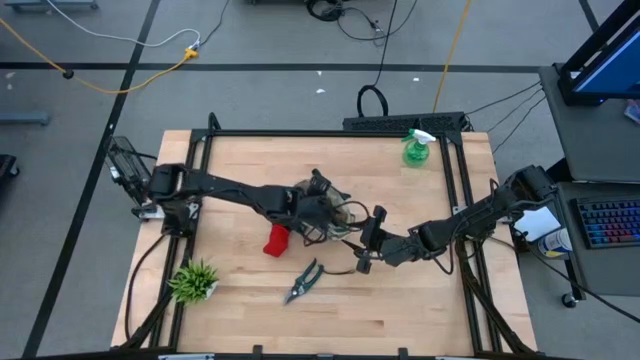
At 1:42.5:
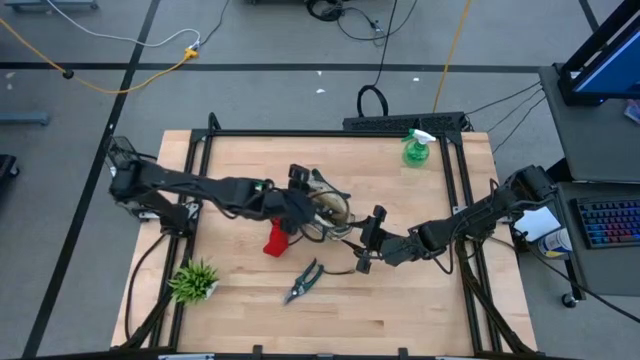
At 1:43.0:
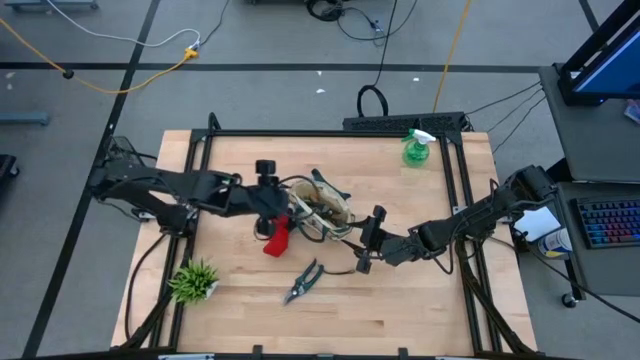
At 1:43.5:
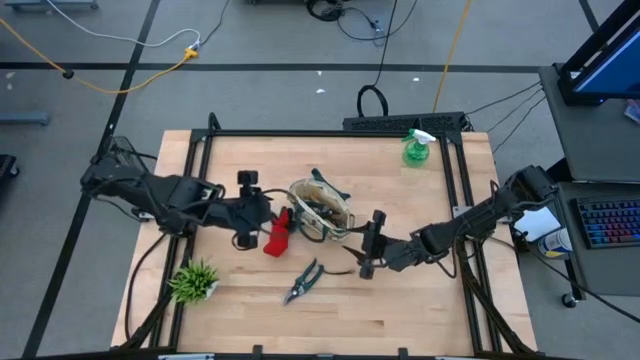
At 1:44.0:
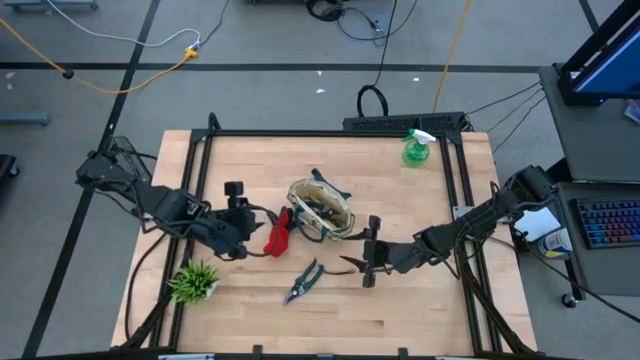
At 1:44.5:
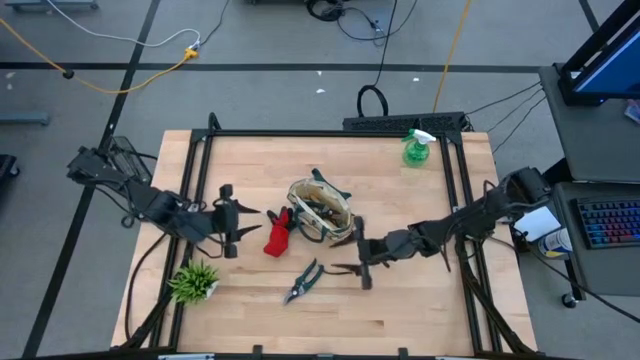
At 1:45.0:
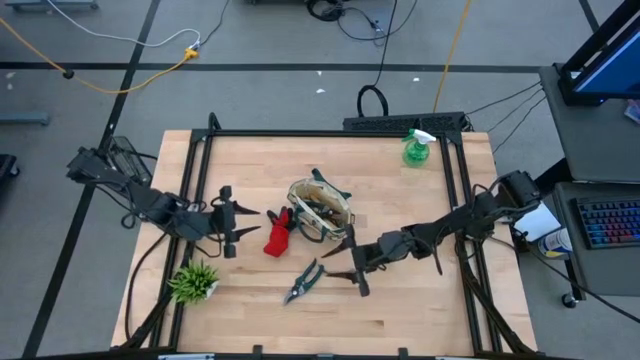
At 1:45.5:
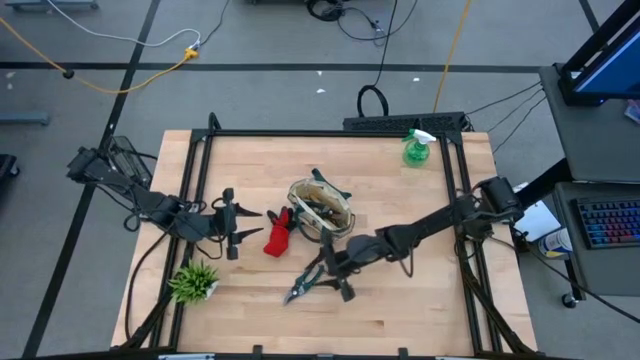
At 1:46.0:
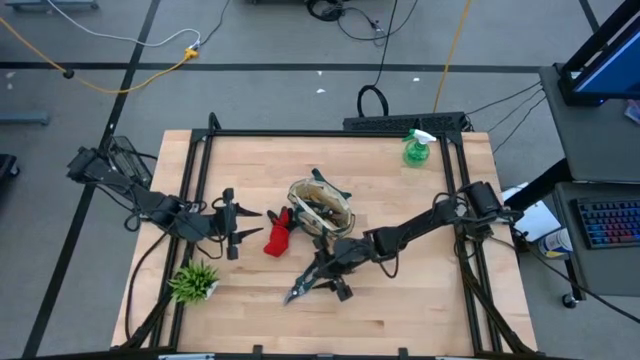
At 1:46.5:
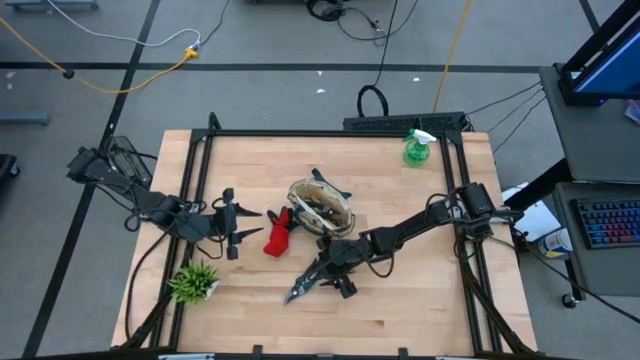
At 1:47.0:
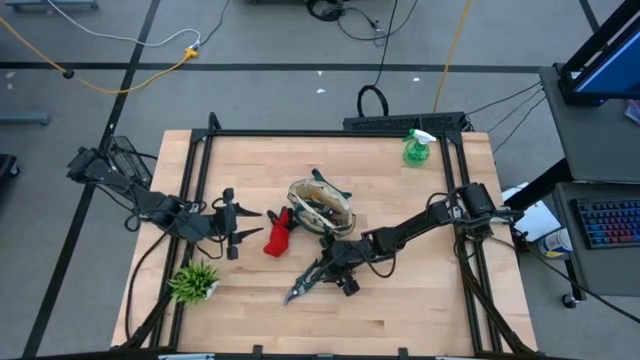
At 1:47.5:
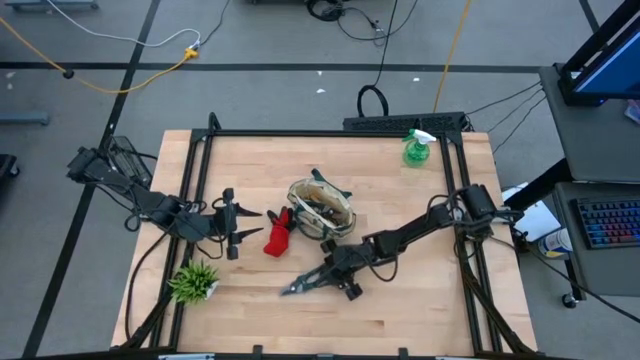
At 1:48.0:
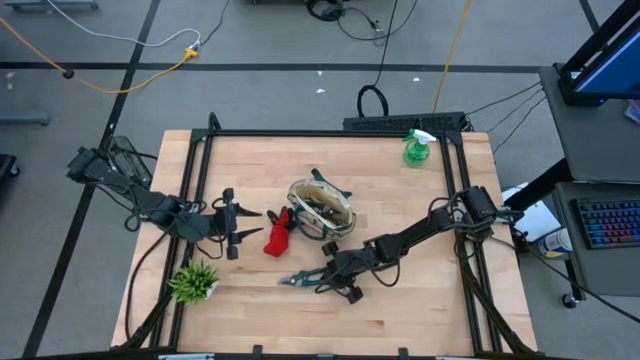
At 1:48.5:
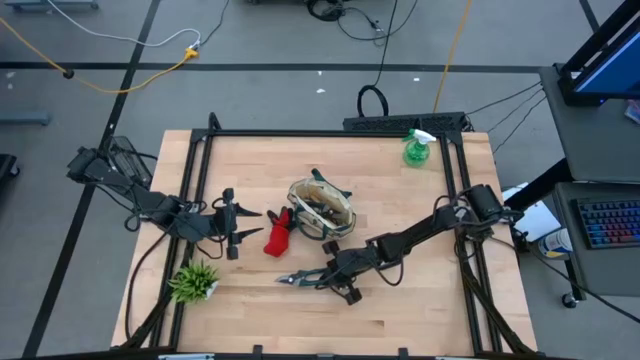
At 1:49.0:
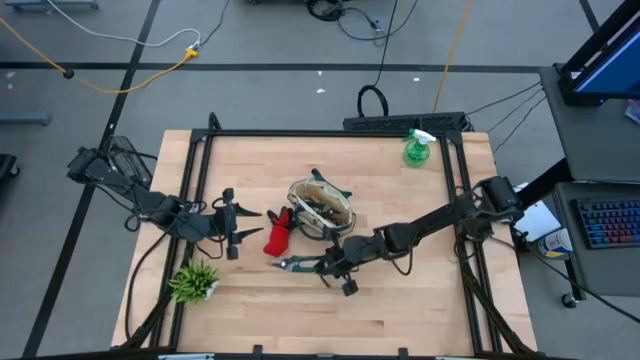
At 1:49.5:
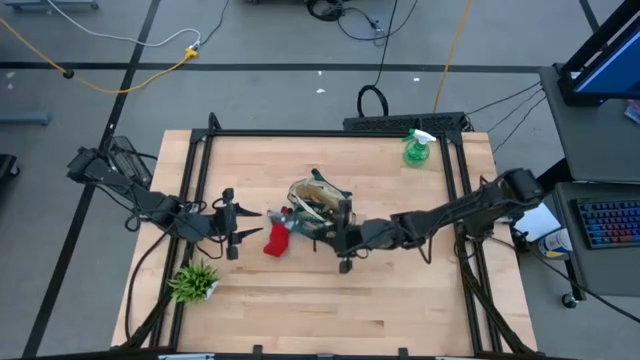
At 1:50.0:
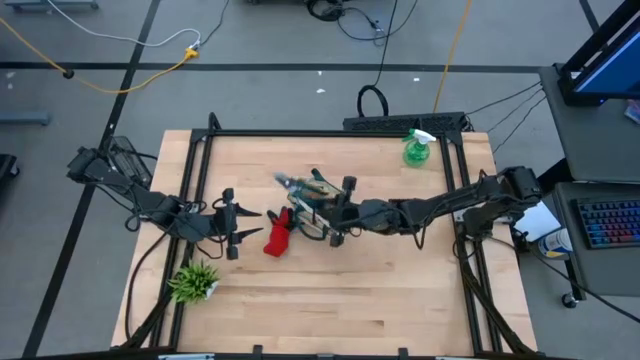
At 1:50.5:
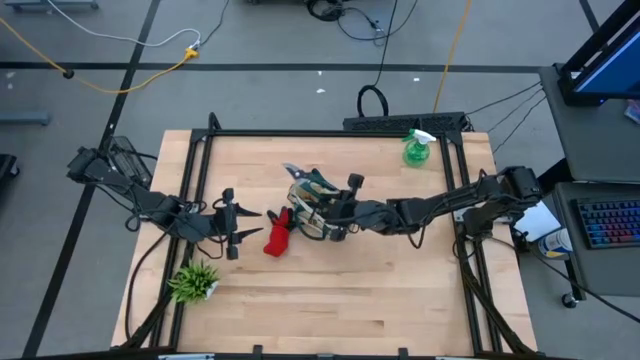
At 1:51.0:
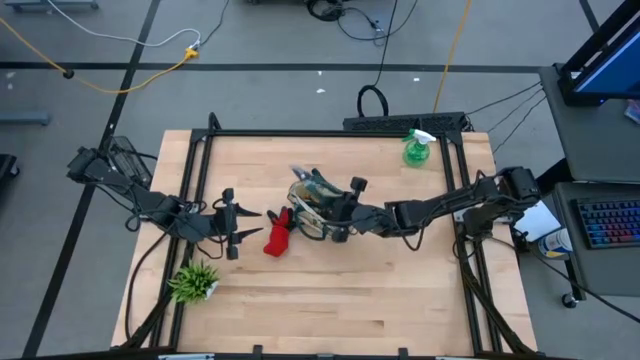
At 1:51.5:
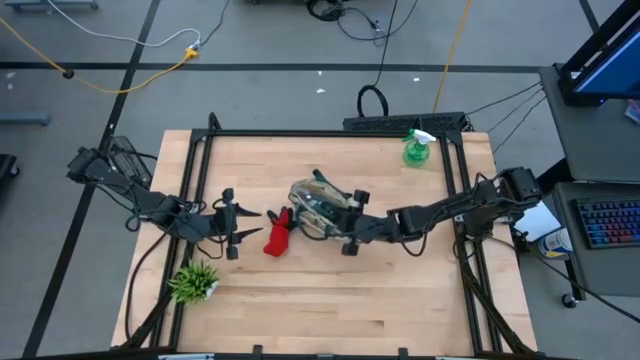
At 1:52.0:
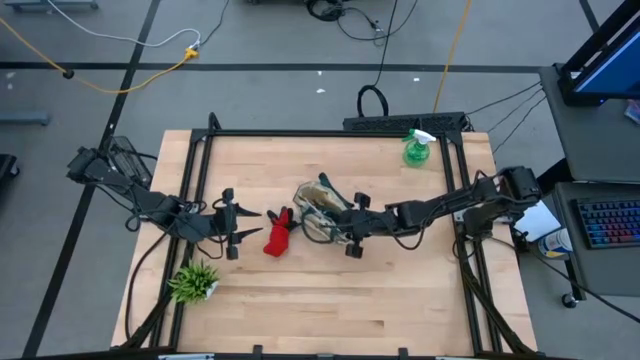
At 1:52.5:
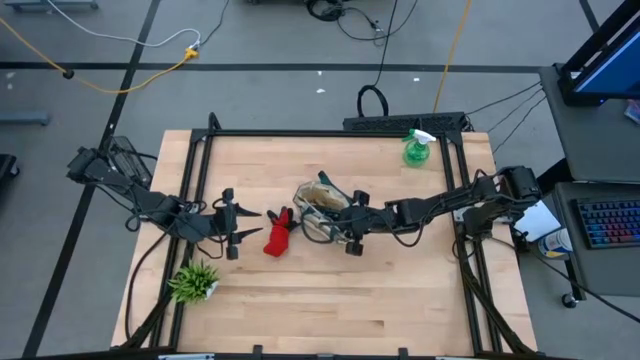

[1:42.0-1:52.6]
Task: Pick & Place Garden tools in Gardening bag
Put the green shear scissors into the gardening bag

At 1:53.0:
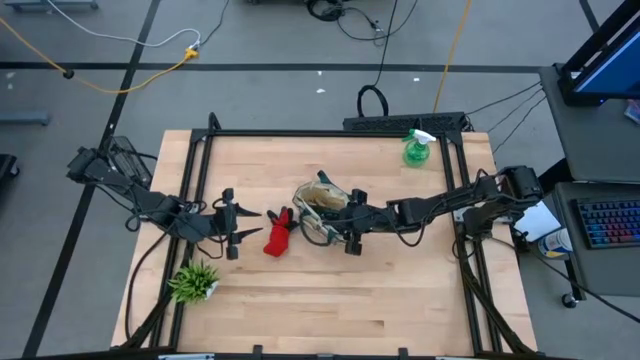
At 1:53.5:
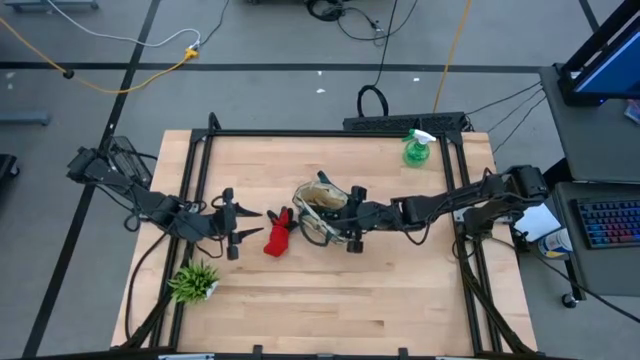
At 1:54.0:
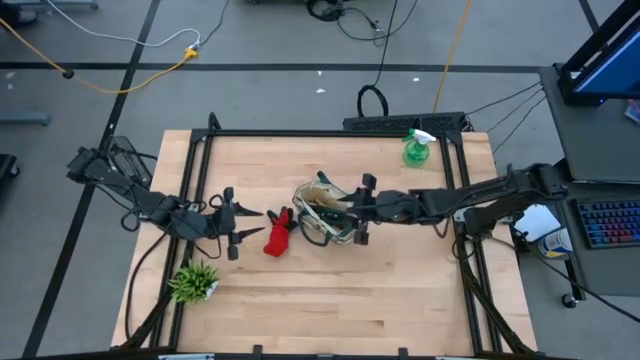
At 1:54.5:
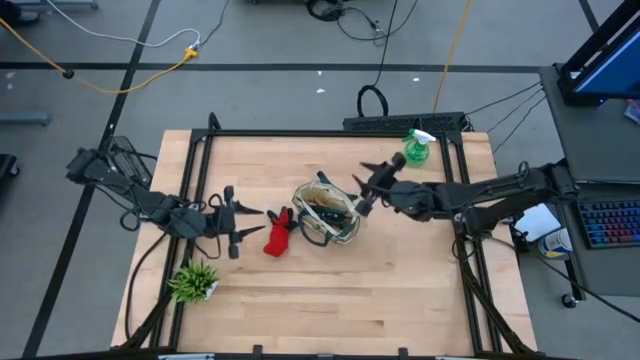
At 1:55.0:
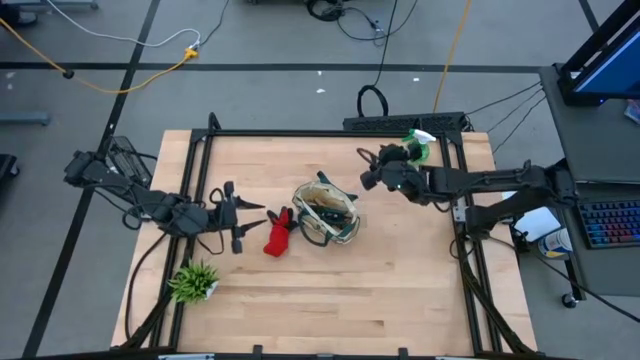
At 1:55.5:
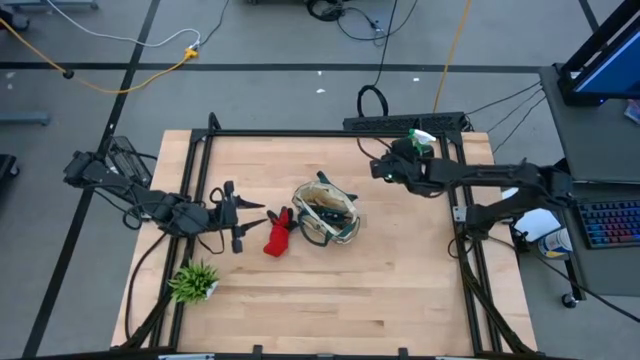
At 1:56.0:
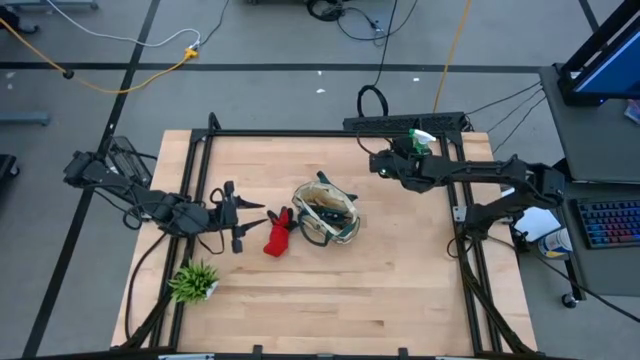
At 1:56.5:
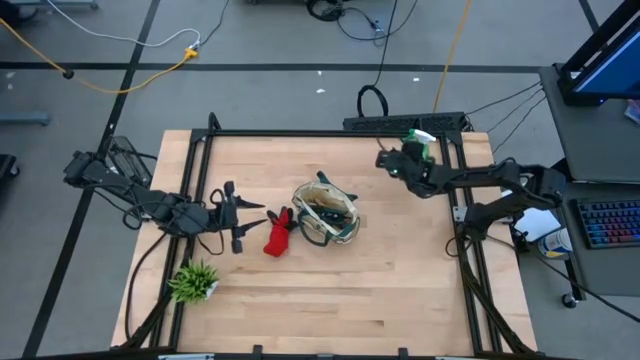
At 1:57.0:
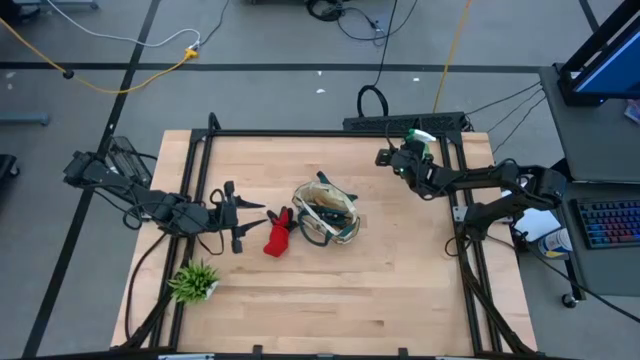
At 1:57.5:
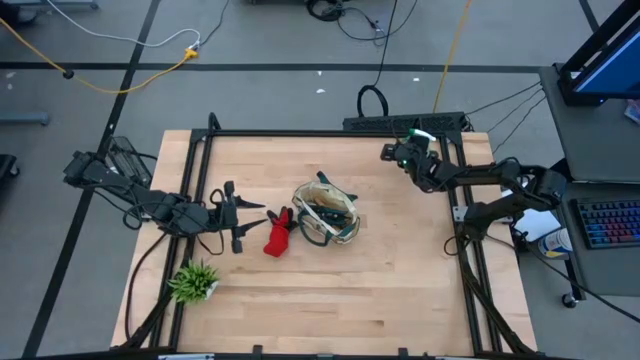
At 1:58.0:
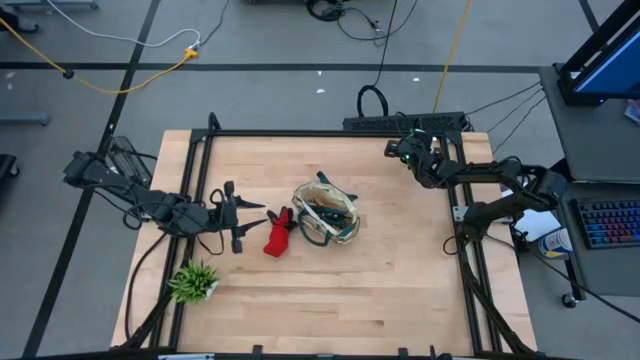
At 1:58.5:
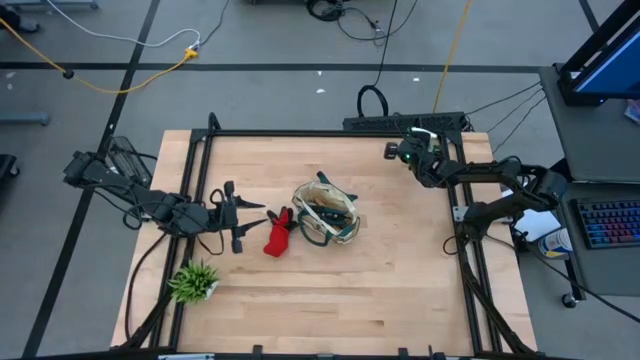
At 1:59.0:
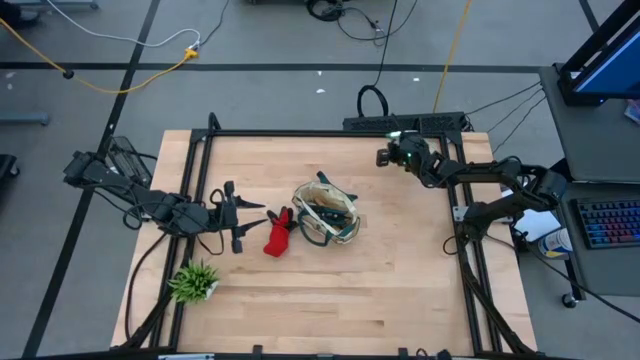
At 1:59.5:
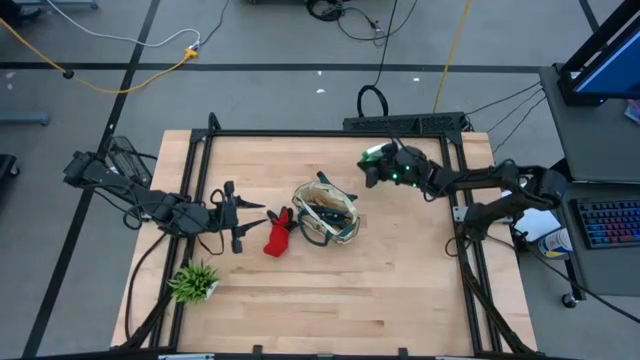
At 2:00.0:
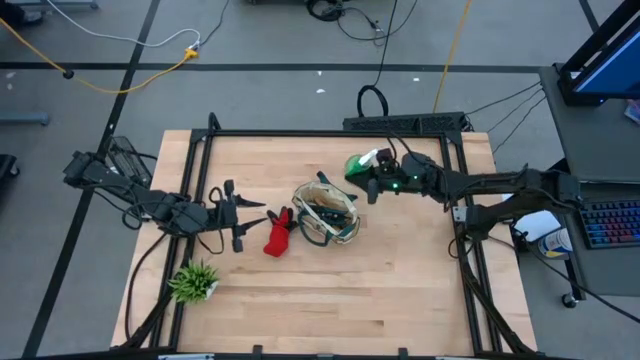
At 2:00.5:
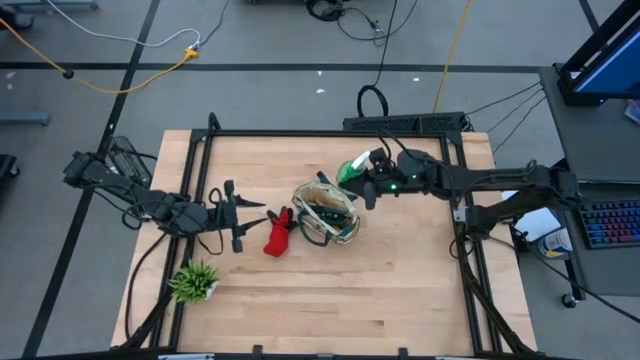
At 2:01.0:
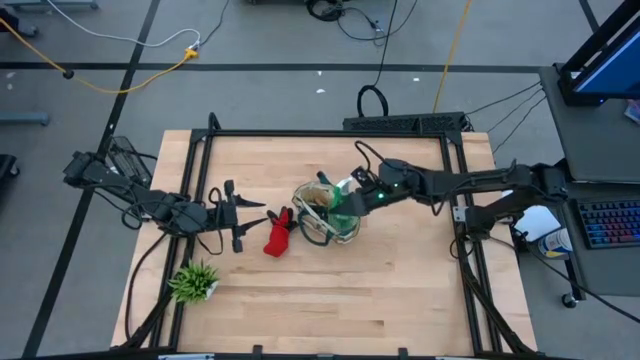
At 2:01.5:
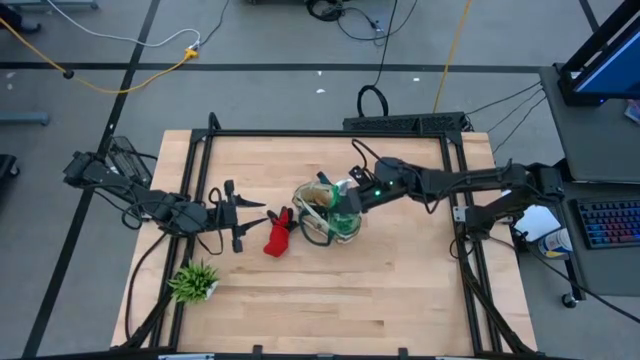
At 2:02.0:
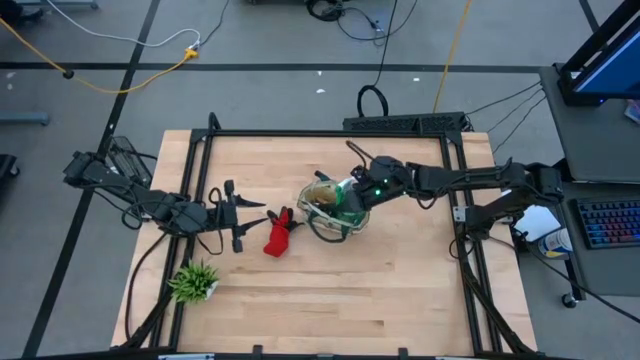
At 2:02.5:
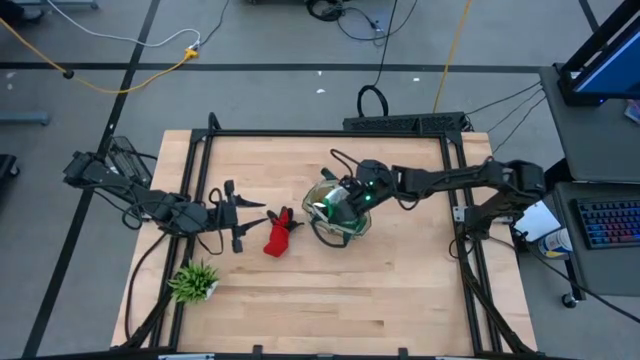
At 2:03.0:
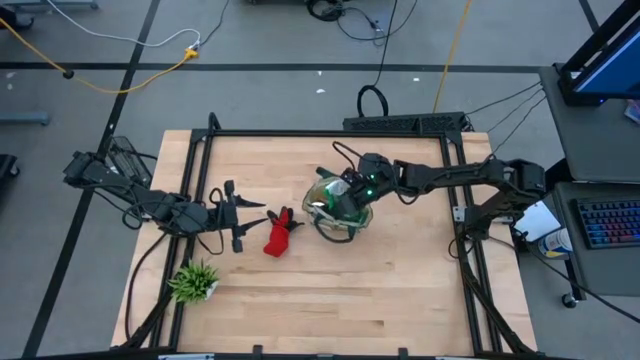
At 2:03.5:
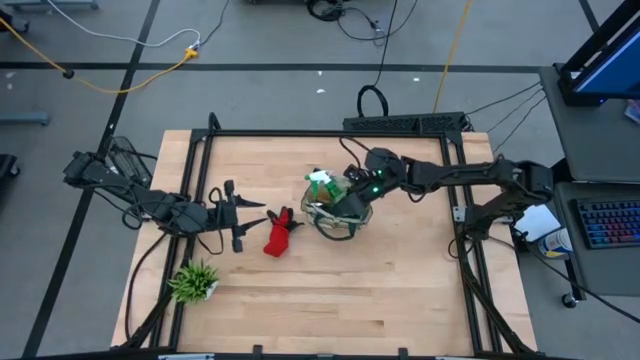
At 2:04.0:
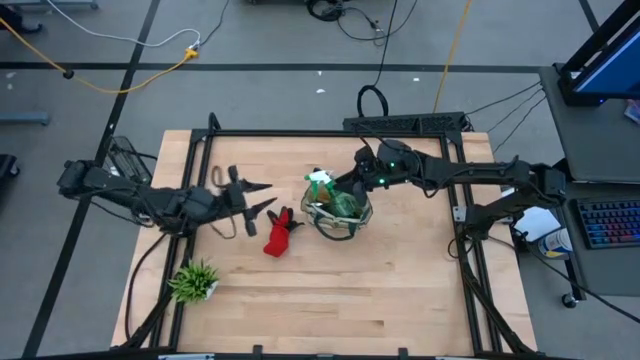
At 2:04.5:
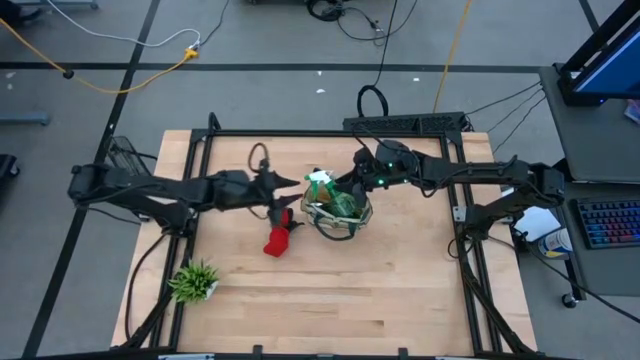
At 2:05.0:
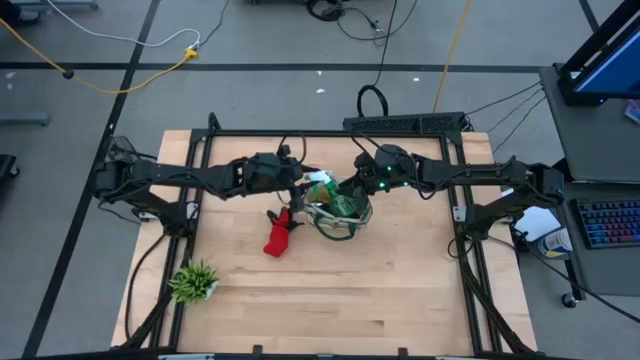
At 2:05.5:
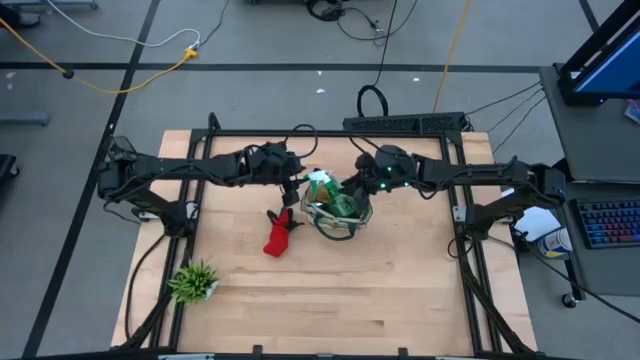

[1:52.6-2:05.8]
Put the green spray bottle into the gardening bag
